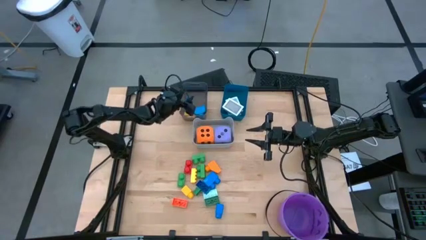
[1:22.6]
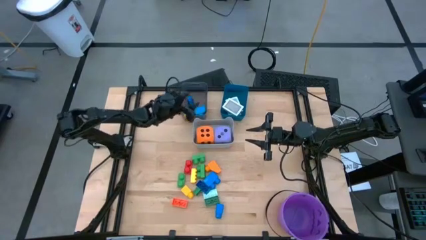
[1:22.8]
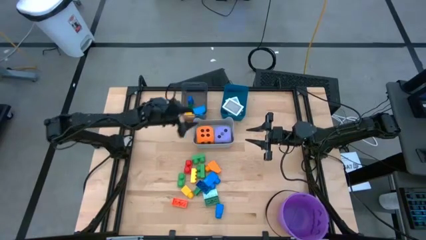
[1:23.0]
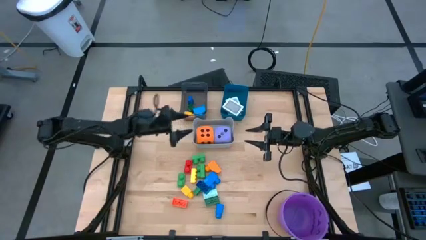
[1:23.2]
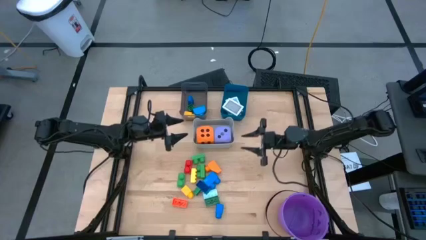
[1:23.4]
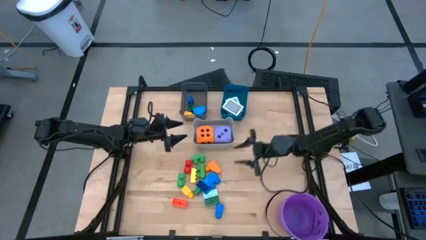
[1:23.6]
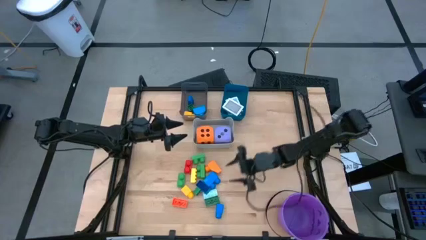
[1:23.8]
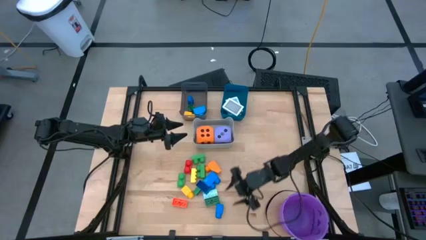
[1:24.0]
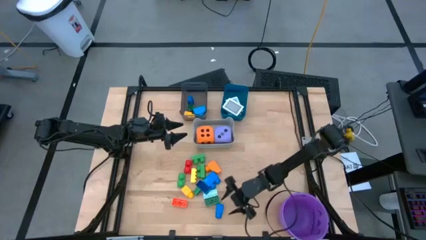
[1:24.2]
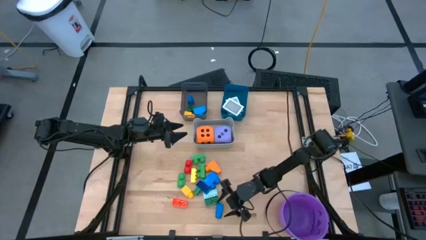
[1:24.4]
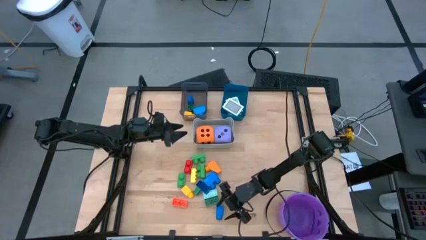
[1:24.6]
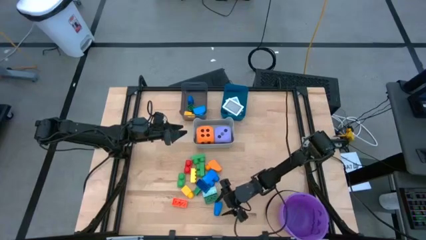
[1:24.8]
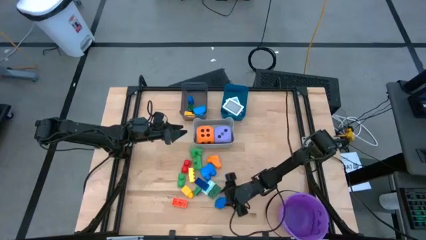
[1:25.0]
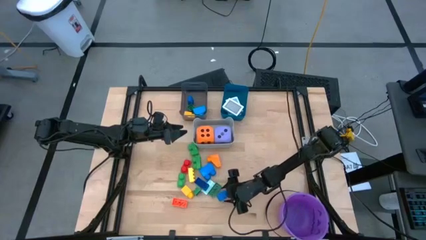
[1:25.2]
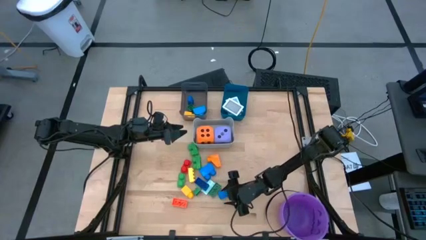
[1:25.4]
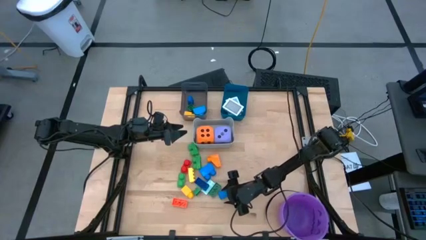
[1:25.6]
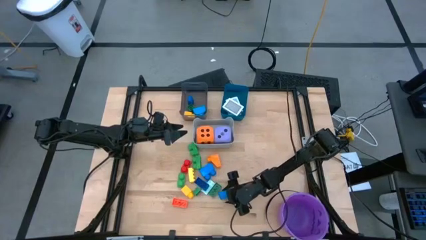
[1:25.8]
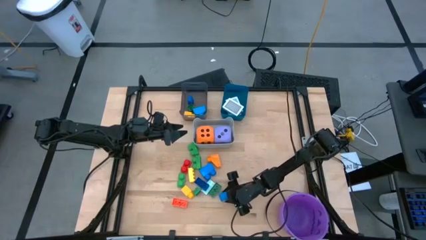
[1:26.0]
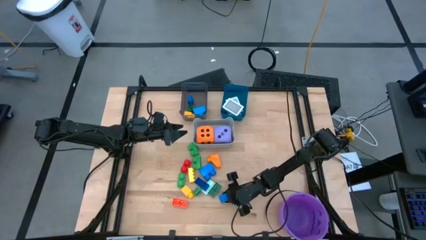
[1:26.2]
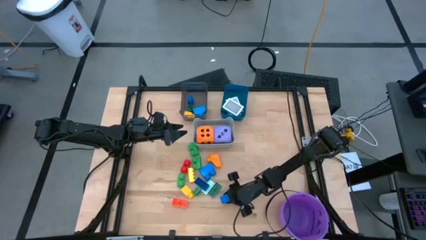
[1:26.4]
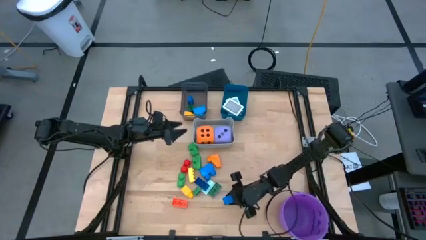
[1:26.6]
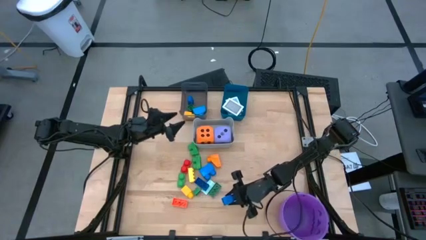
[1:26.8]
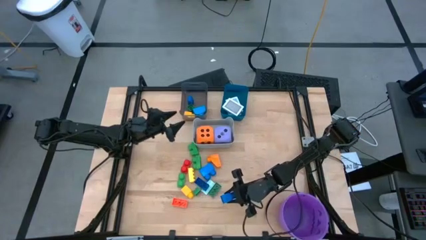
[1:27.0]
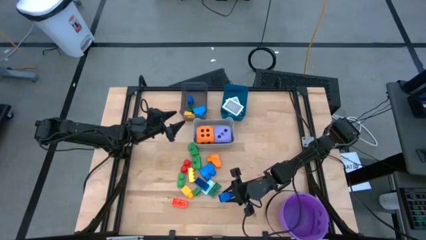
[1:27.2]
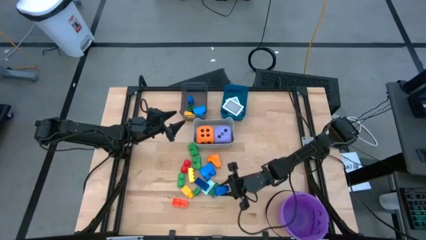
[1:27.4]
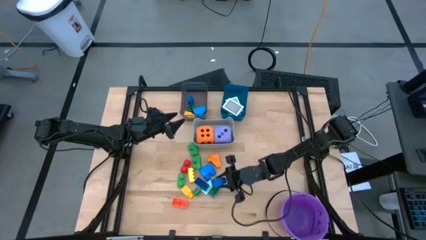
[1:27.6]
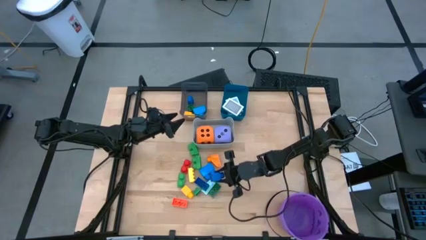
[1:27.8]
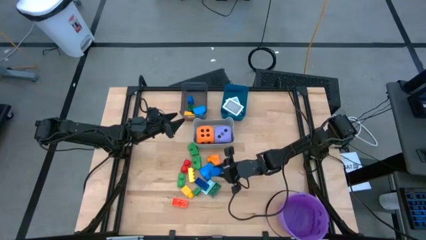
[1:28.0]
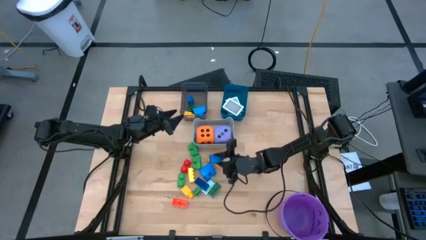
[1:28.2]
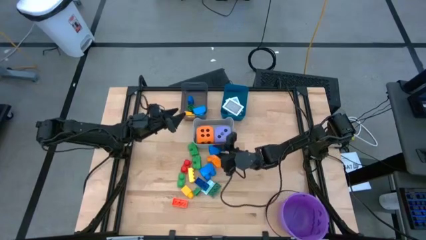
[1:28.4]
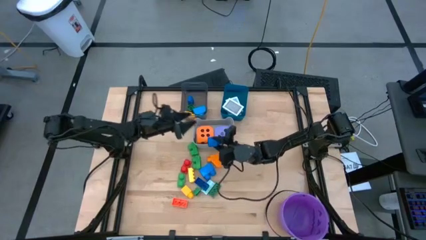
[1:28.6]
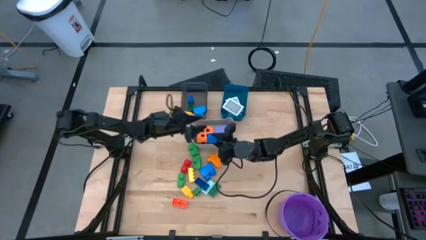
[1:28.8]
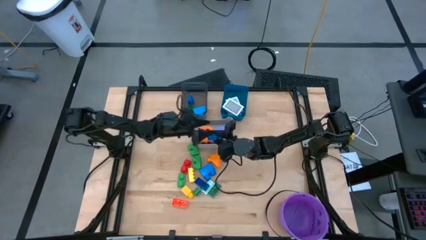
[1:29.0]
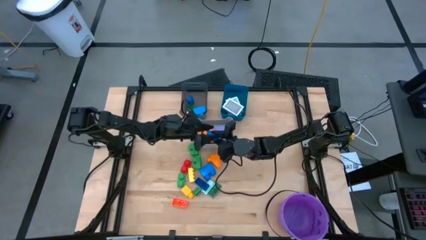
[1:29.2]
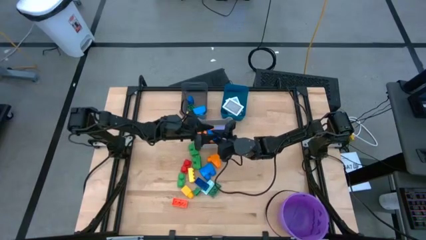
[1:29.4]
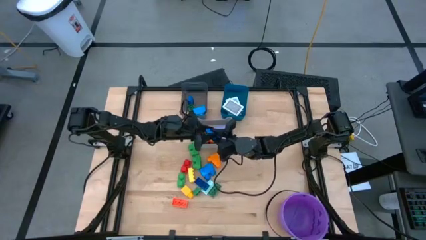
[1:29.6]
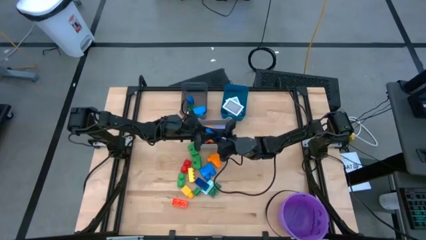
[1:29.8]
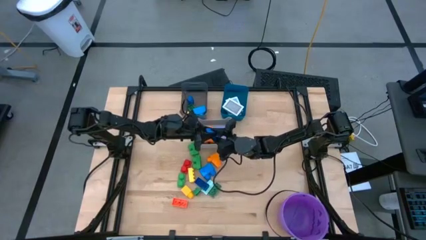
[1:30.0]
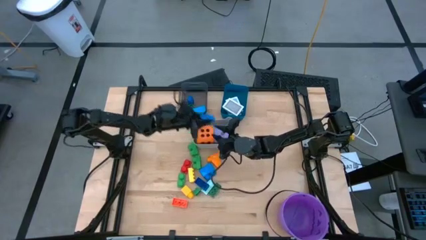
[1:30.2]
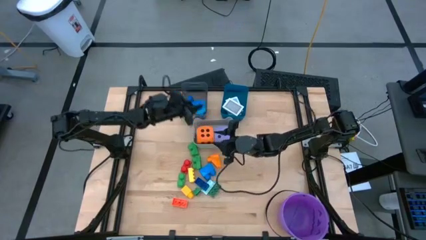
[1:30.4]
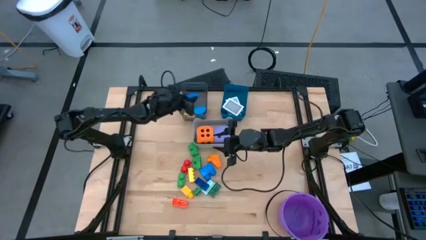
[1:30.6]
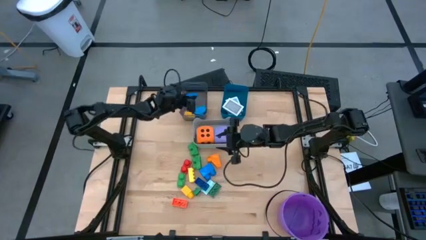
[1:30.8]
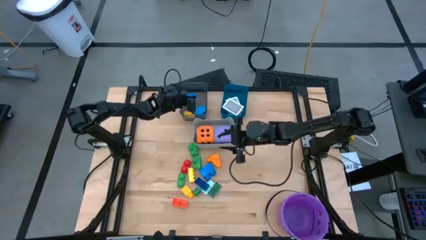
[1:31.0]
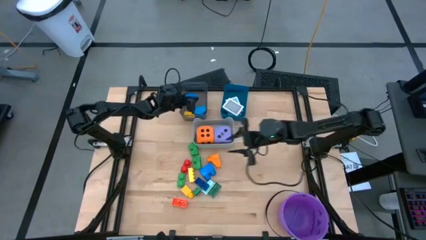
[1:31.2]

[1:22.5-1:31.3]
Task: Pick & Place Toys
Put the bottom blue game piece into the black bin

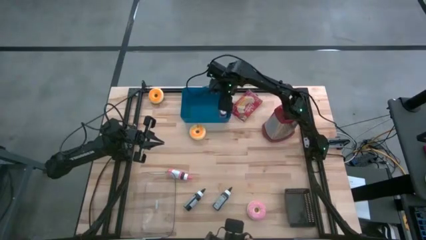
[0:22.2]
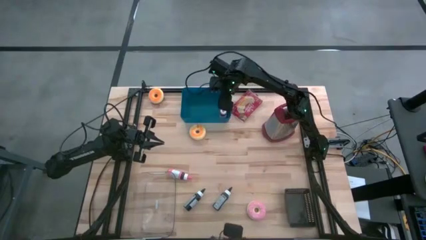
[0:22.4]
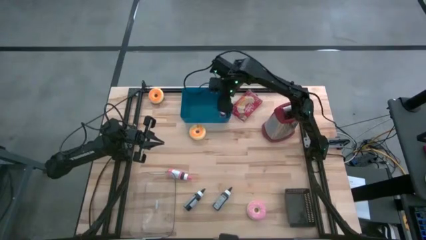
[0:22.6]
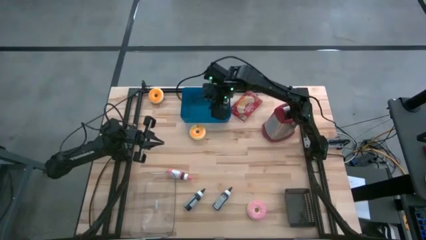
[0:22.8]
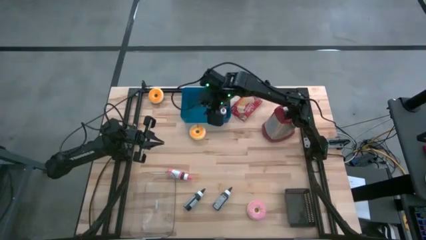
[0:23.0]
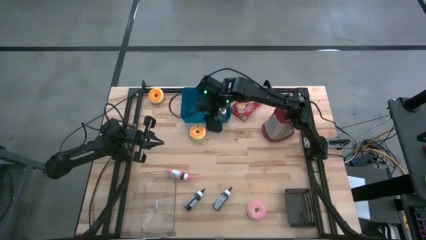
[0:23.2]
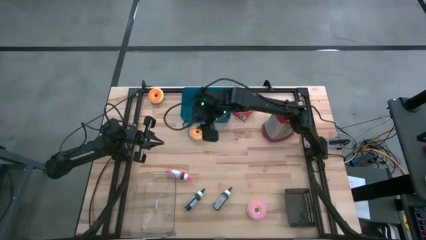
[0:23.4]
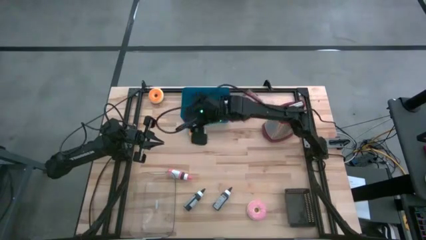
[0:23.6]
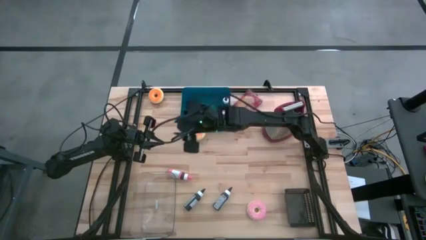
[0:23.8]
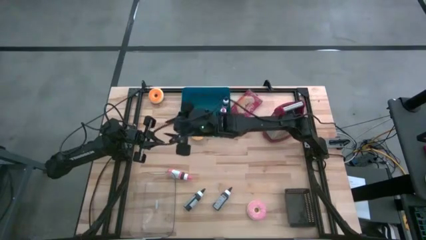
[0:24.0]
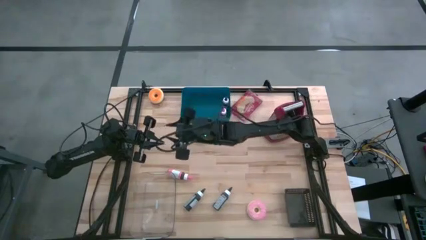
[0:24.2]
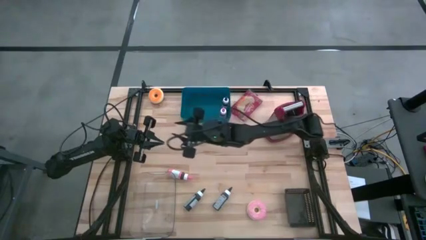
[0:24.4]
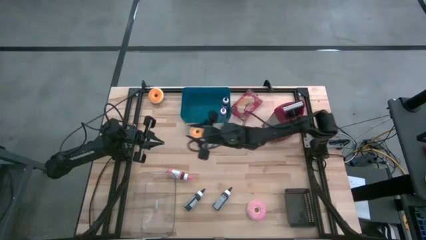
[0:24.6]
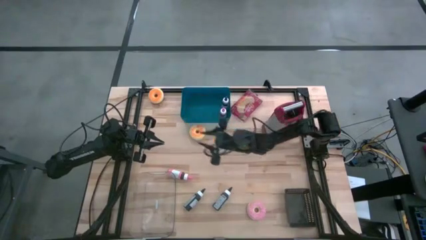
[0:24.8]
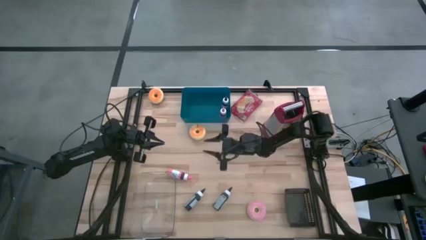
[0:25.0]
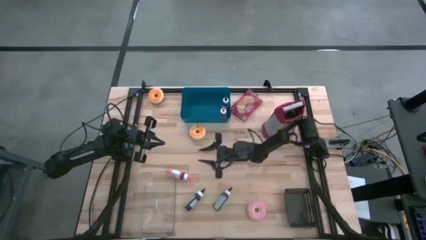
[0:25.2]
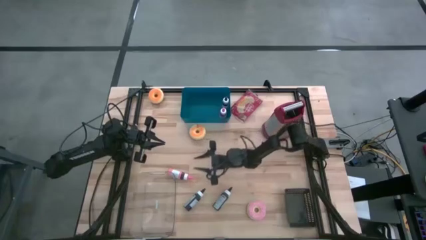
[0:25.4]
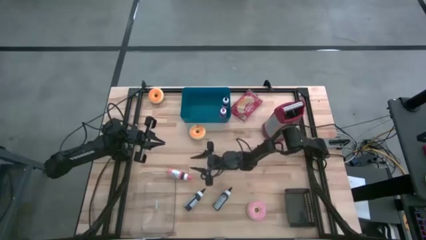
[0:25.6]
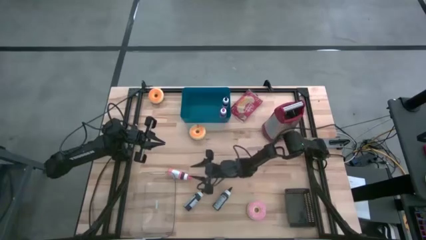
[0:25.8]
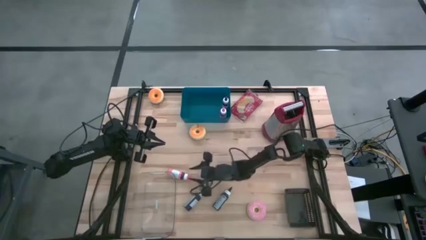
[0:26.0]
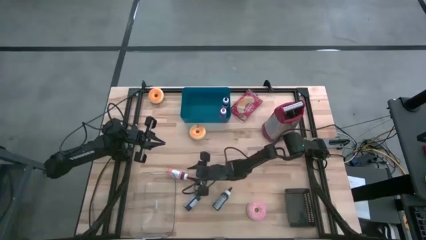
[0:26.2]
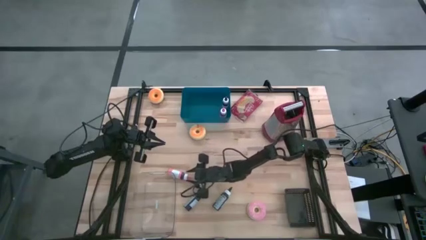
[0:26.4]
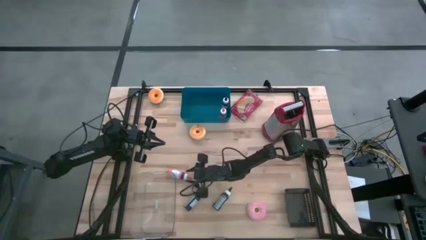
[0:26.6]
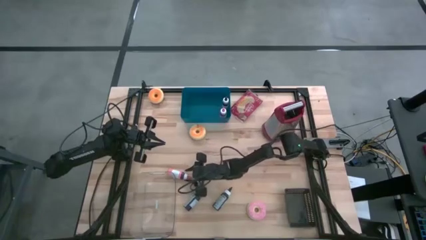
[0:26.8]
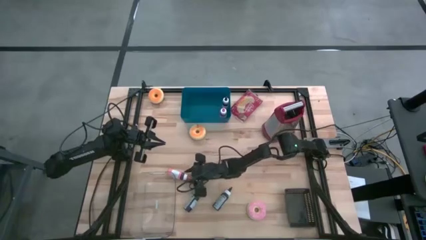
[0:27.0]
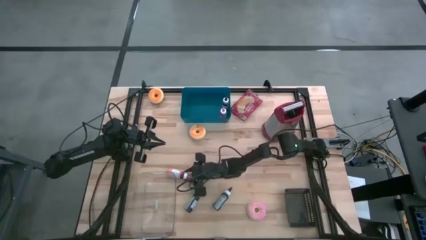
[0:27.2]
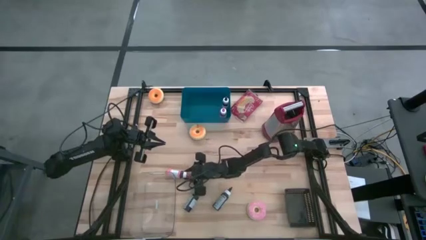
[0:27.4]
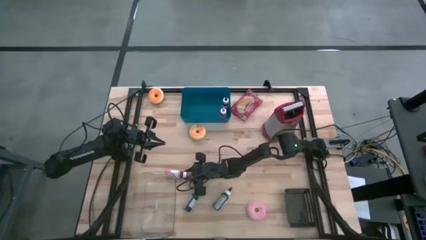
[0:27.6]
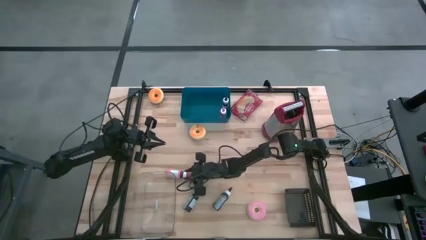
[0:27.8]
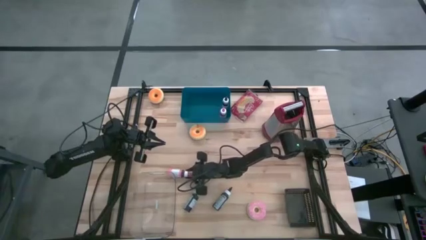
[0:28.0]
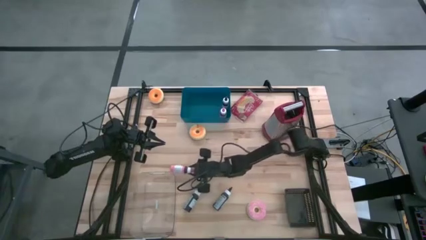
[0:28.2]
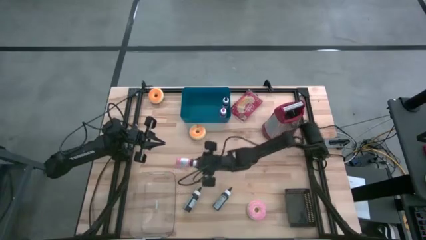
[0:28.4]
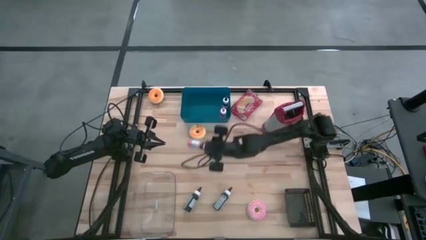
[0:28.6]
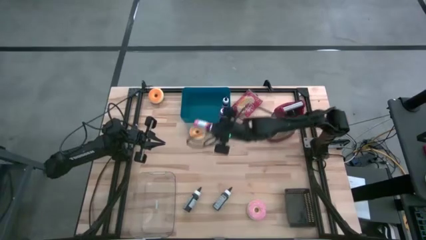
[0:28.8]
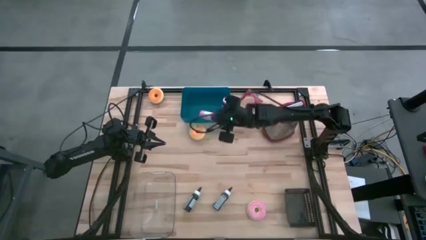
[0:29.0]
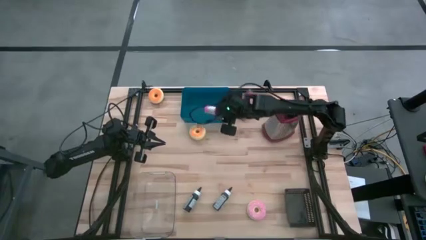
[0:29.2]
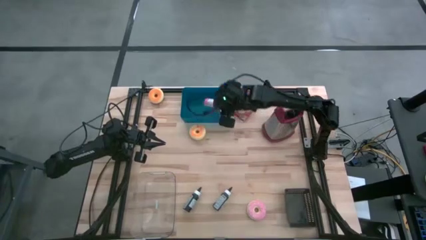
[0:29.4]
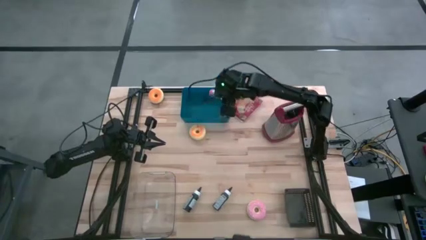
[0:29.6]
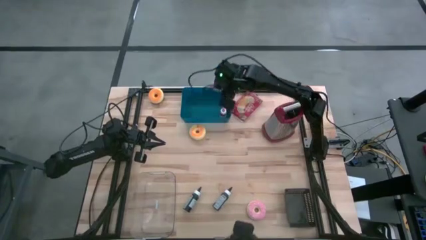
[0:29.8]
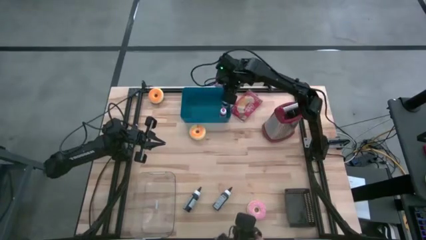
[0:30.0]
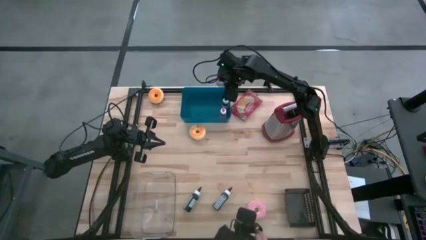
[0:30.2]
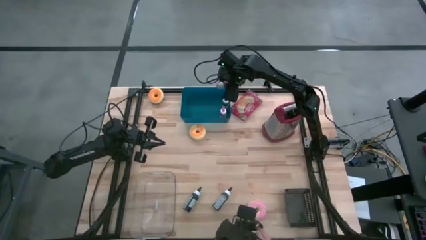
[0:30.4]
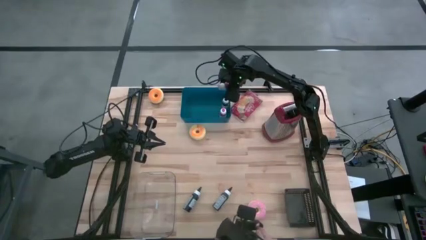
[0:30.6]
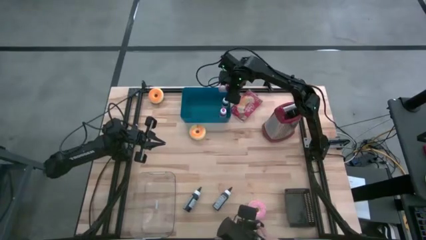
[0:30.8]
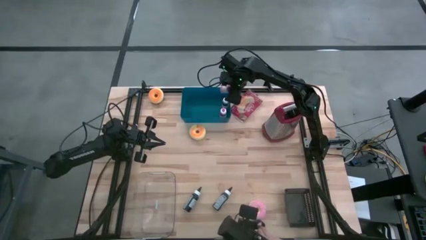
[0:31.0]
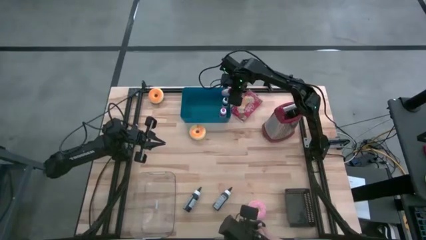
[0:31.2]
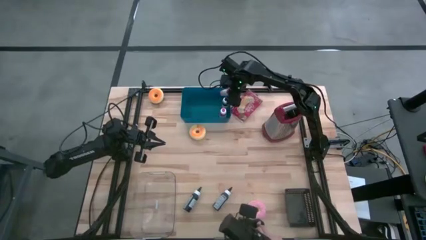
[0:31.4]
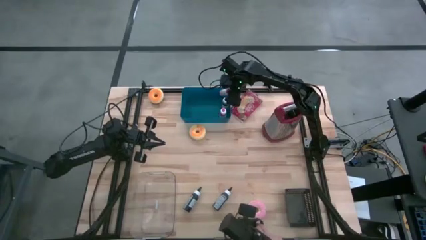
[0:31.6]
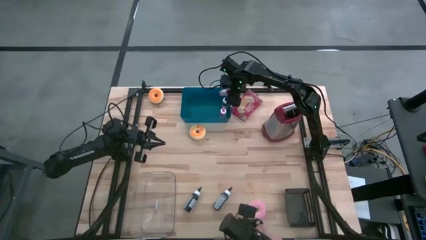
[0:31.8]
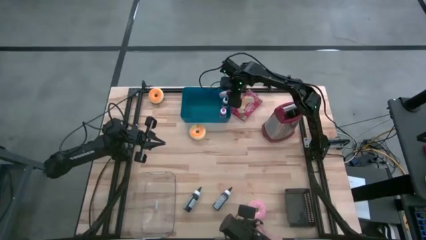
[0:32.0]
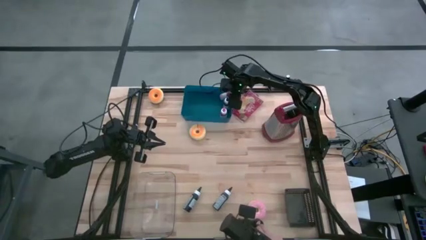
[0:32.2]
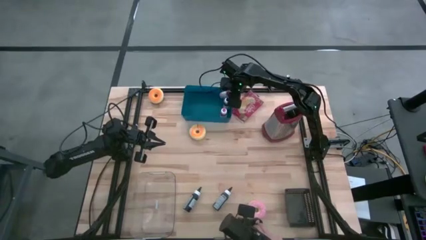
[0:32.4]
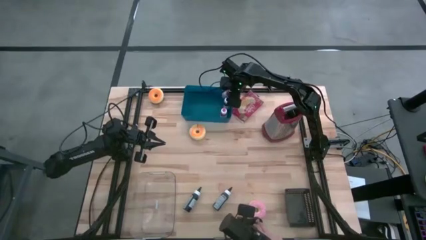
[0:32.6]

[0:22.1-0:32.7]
Task: Pick & Place Food Item
Put the pink food coloring into the blue bin
